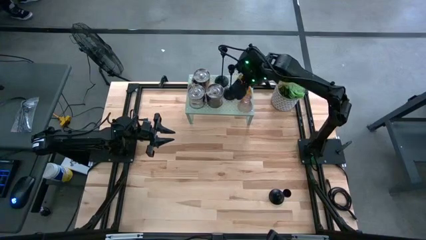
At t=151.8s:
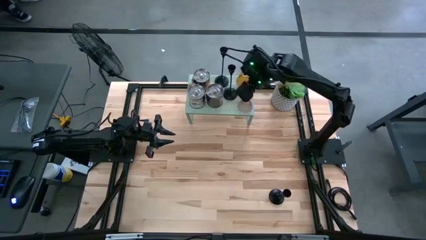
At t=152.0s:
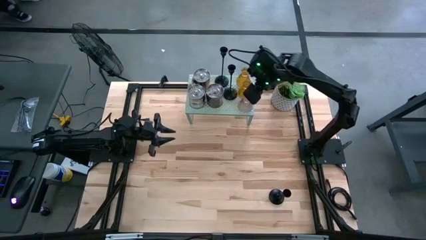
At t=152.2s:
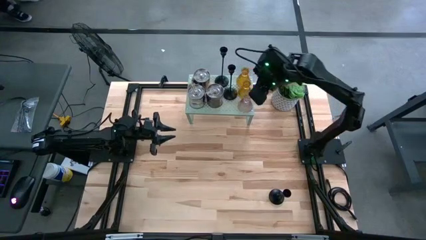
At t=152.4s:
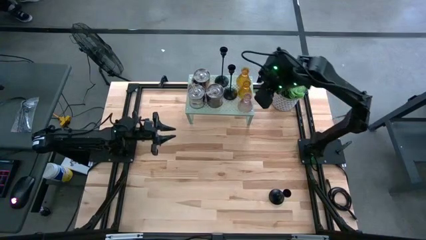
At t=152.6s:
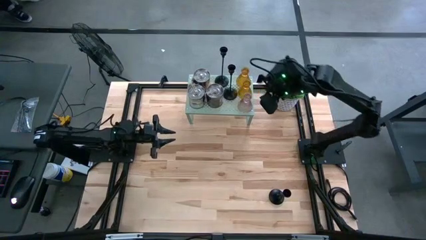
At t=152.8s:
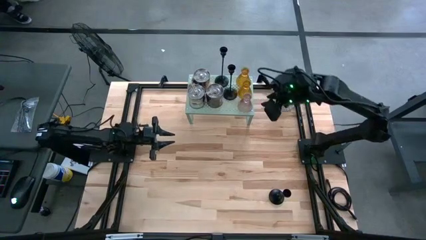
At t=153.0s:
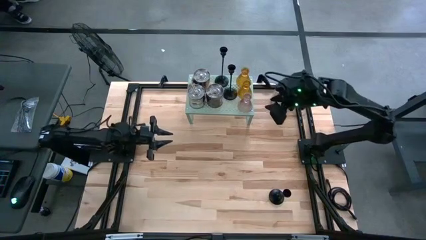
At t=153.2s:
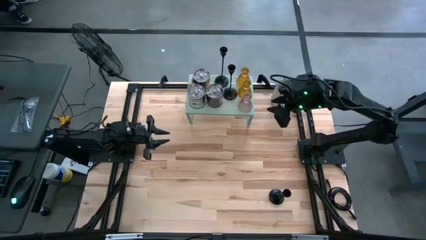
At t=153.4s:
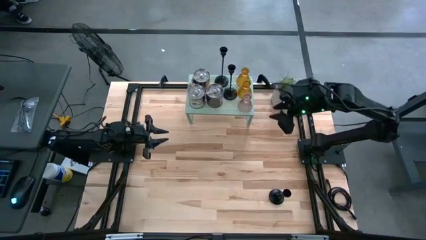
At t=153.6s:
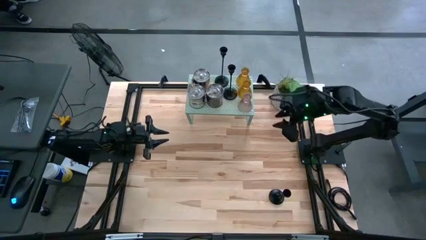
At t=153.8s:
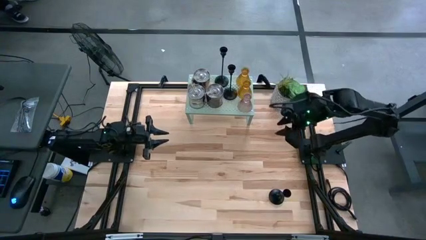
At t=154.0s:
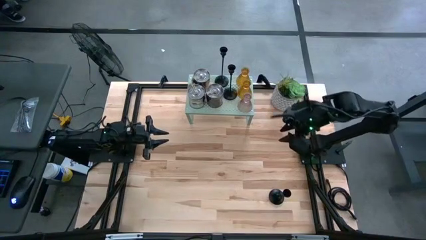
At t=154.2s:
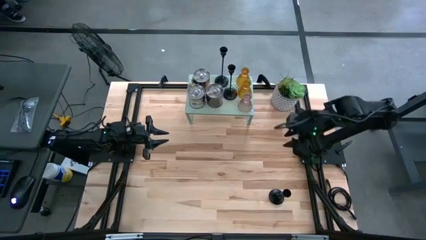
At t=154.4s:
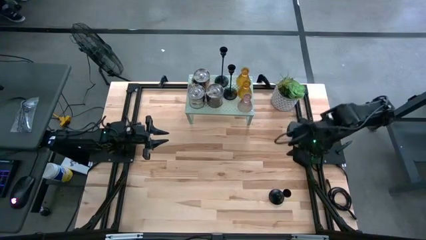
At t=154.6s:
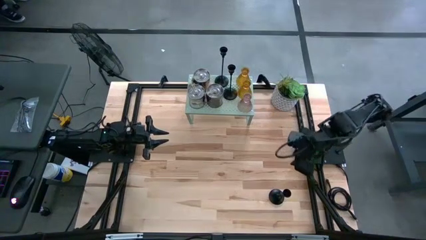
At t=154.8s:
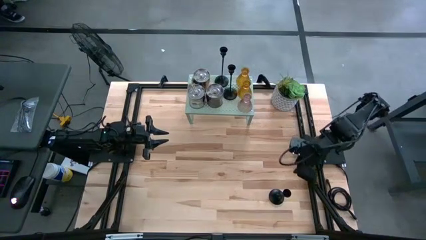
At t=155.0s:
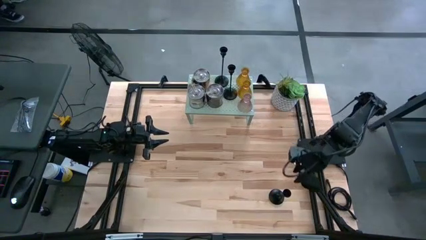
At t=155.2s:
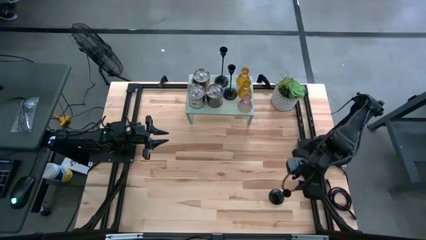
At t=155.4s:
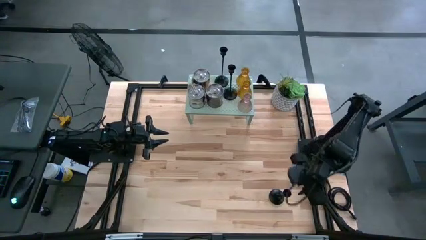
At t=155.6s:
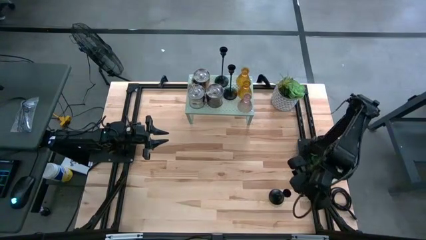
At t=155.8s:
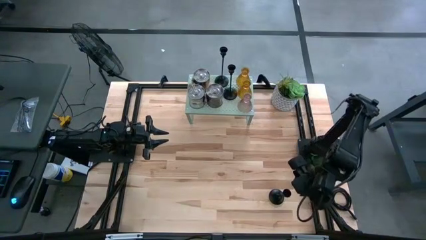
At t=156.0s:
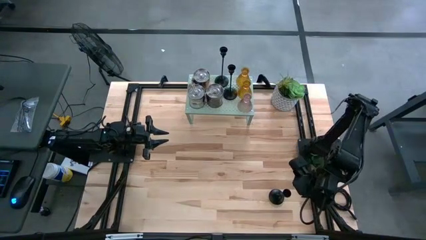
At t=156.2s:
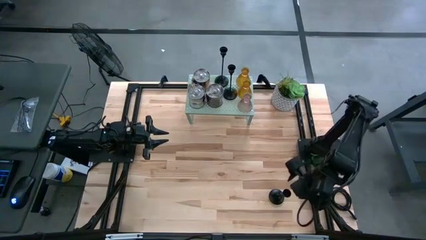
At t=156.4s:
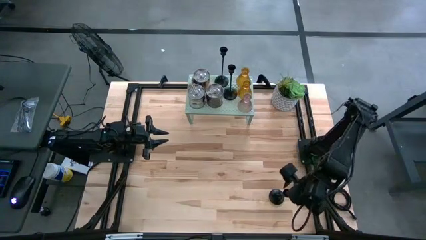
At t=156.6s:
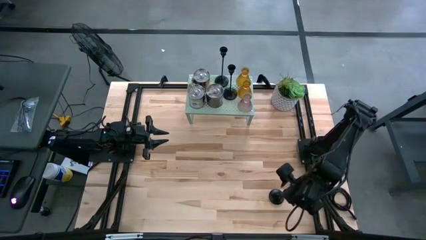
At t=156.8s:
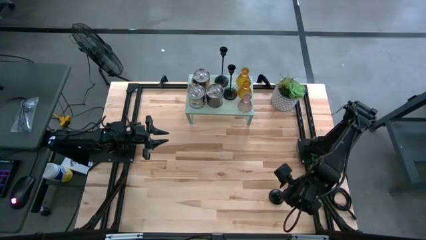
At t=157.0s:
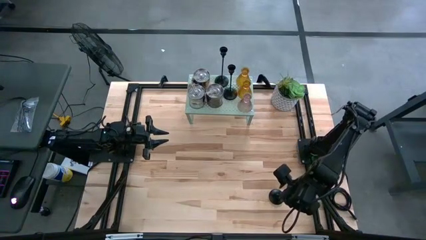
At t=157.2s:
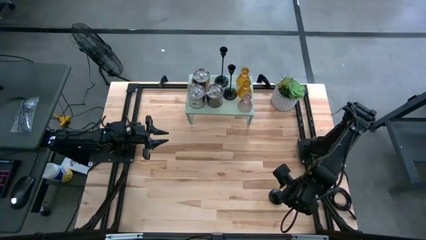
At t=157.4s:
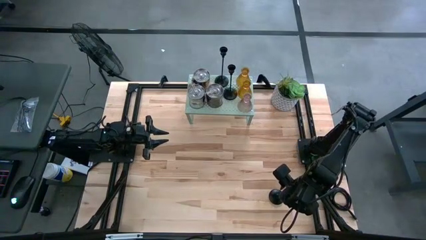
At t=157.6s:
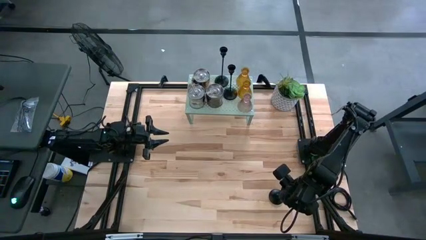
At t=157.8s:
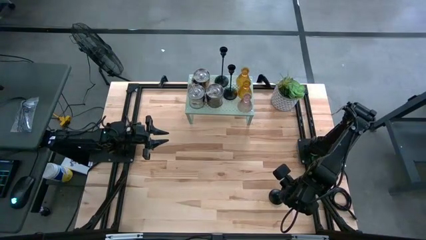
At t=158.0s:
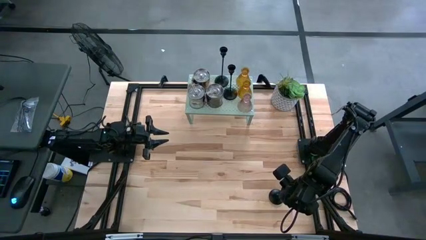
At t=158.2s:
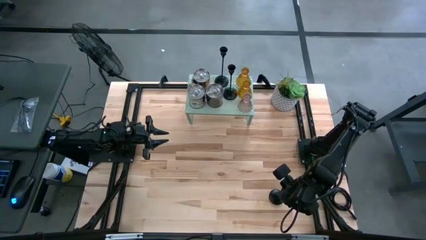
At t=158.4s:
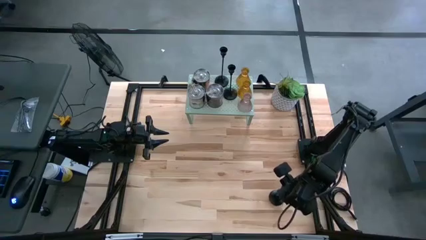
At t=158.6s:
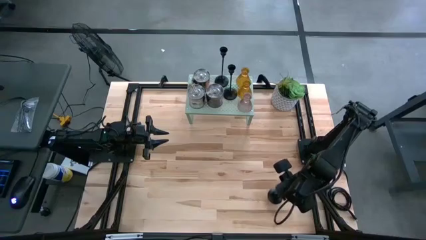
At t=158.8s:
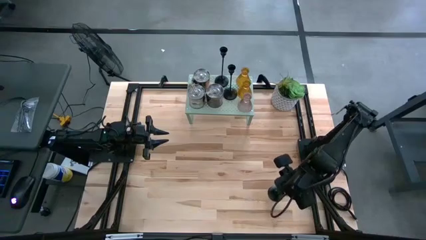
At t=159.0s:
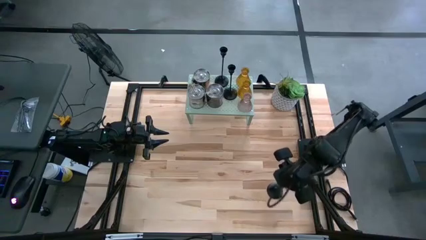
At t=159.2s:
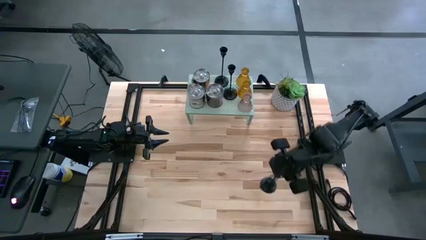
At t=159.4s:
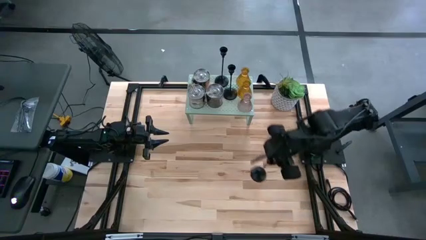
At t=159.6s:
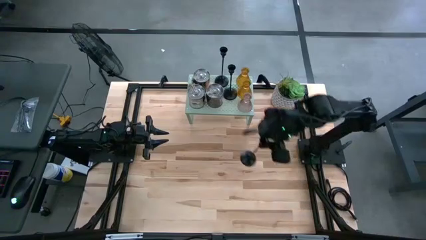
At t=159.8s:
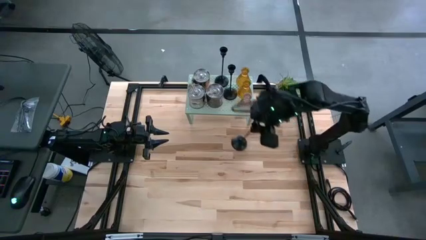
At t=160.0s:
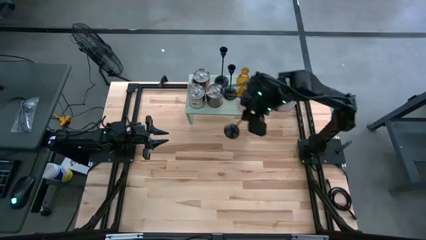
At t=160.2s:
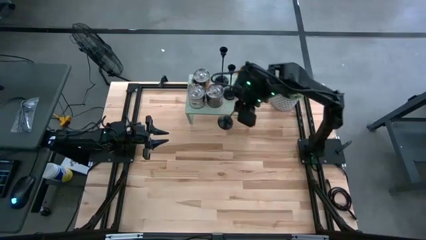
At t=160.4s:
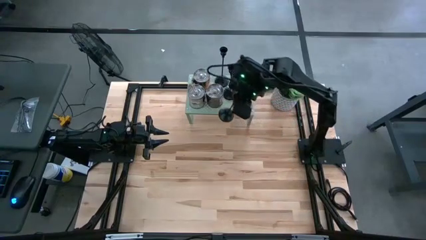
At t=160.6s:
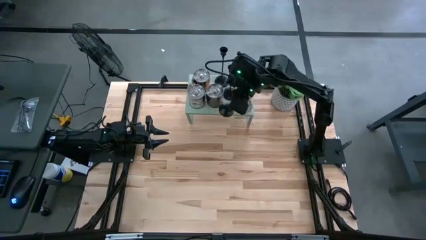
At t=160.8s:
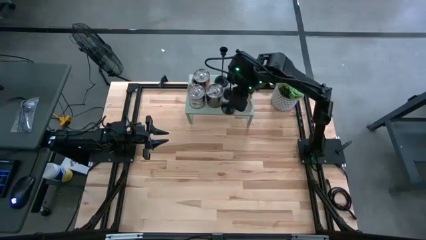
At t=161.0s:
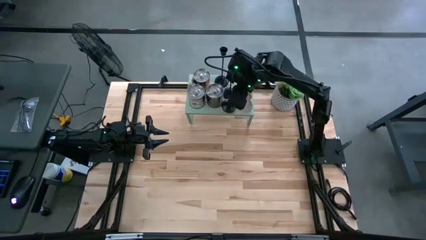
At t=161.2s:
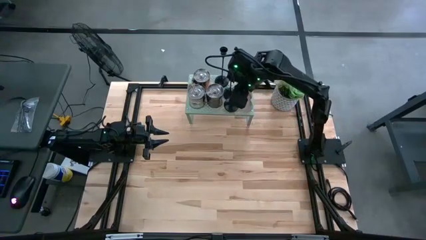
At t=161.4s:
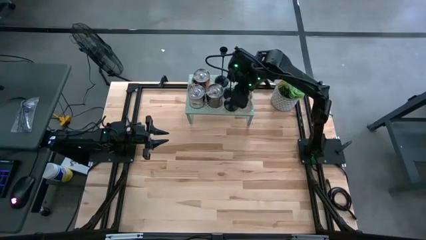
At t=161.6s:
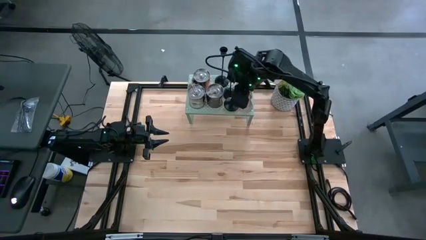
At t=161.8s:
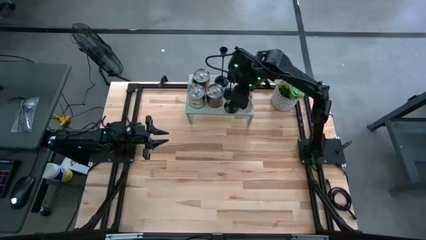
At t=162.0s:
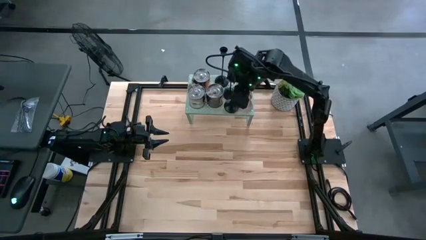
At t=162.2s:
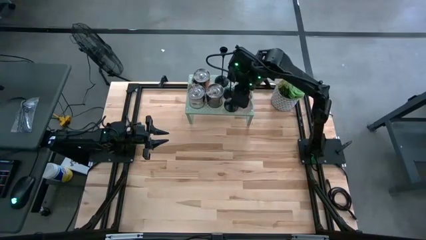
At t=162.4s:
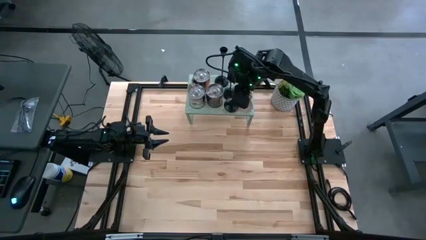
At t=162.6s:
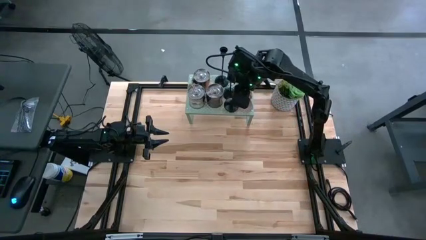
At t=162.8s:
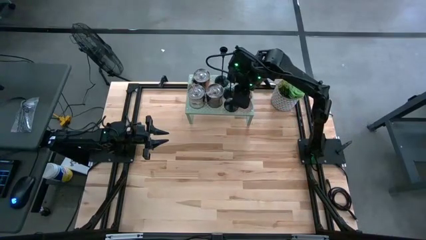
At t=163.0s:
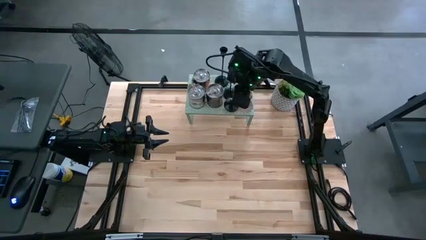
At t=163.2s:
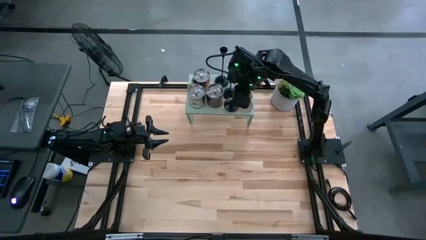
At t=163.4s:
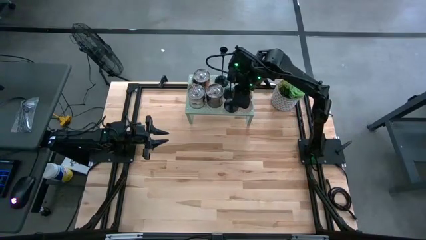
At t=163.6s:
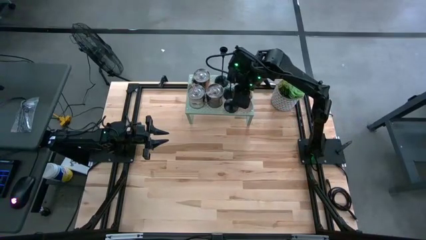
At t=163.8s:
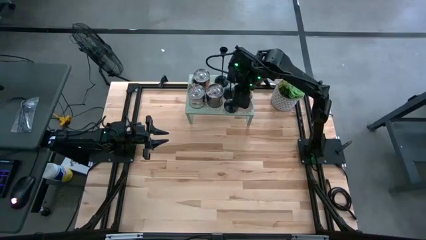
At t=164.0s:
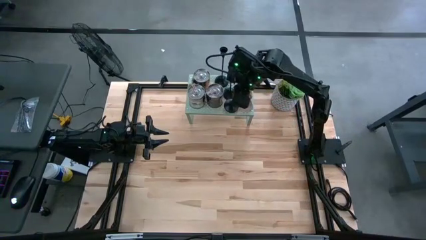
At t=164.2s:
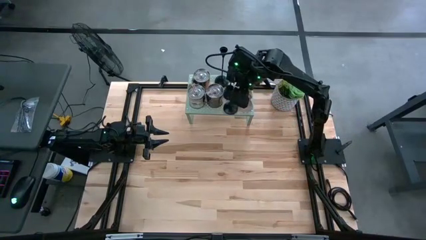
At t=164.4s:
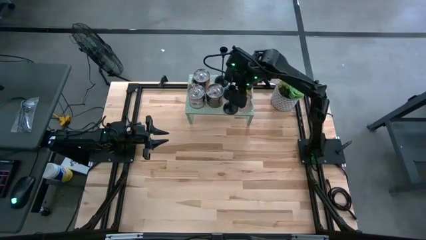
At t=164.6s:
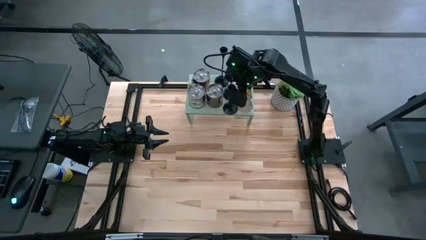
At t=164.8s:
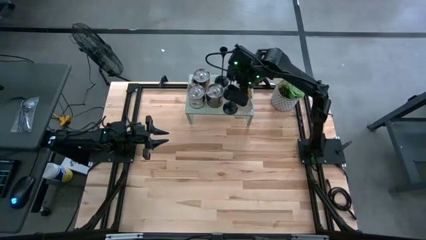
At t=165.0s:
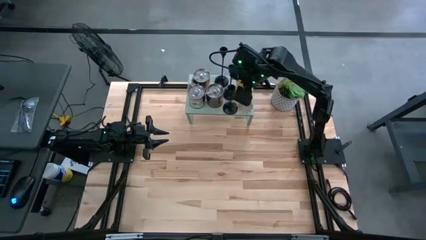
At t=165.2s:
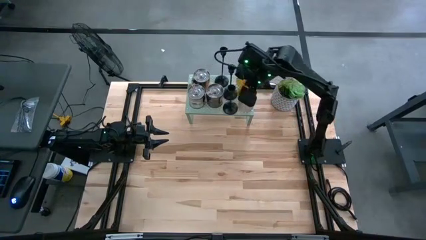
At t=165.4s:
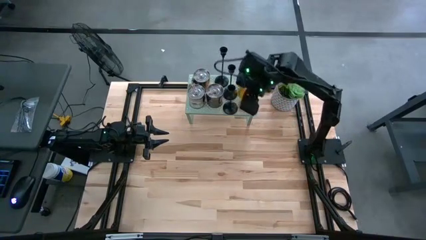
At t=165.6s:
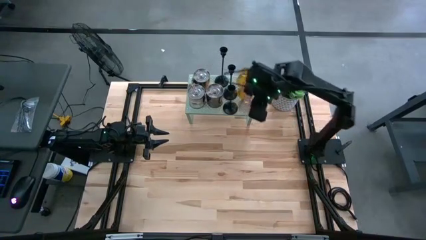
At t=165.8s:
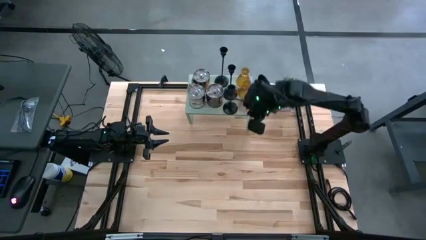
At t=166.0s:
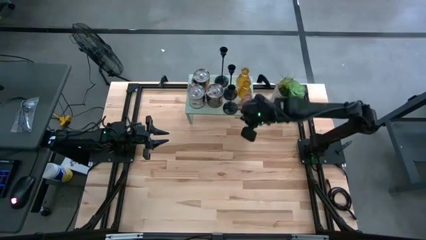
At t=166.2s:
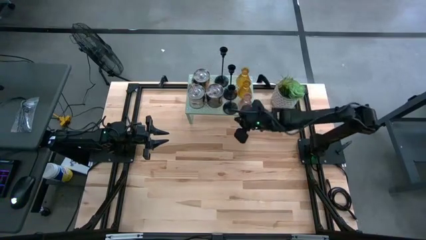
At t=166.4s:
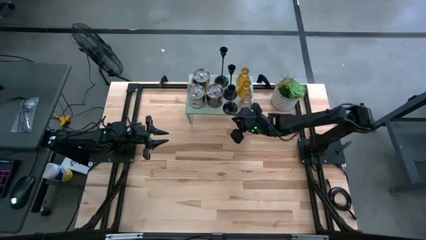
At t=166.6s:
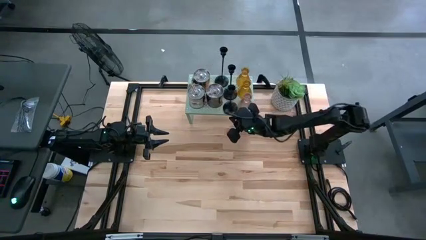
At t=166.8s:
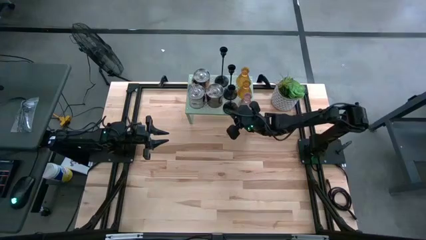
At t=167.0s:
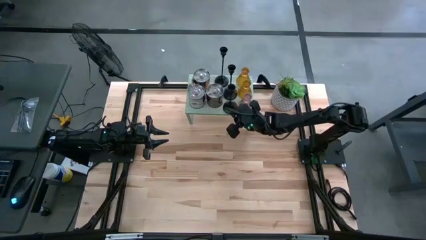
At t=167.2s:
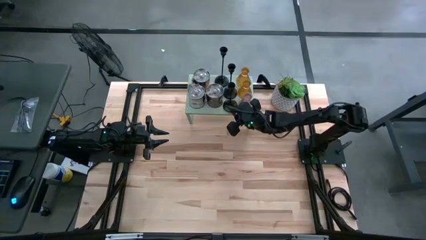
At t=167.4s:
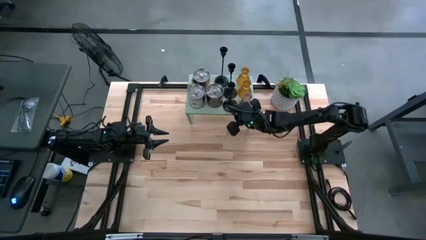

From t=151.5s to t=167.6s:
Task: Pick & Place candle stick holders
Put the black candle holder on the shelf
